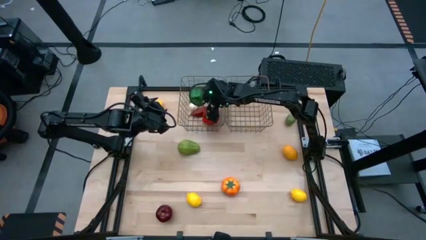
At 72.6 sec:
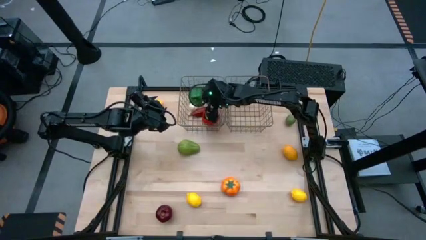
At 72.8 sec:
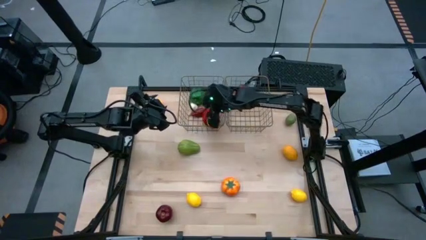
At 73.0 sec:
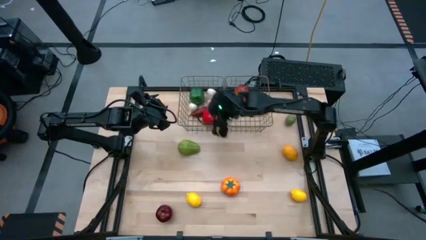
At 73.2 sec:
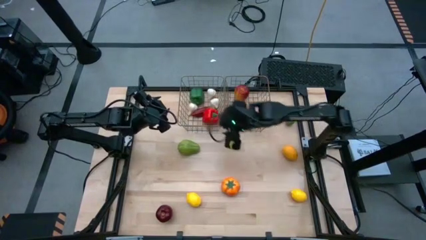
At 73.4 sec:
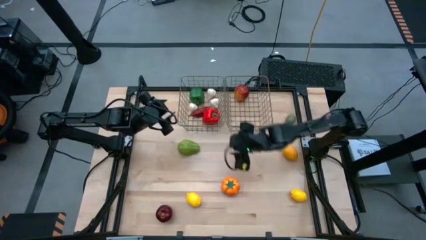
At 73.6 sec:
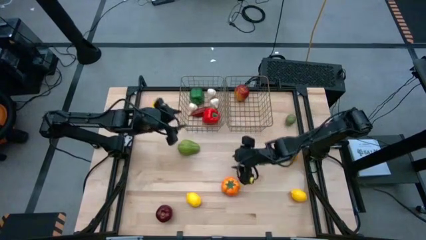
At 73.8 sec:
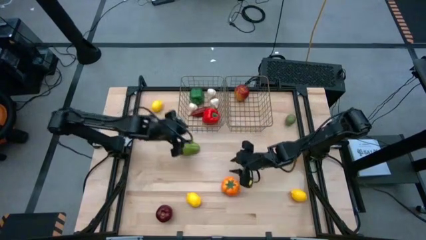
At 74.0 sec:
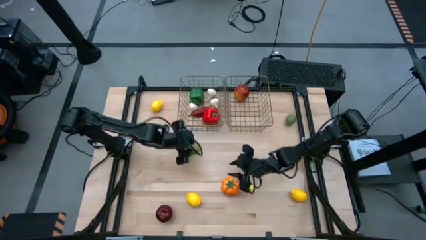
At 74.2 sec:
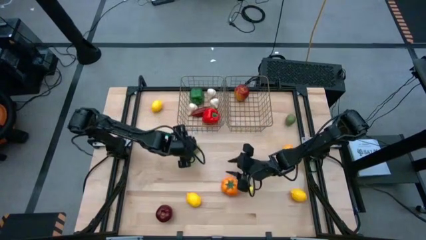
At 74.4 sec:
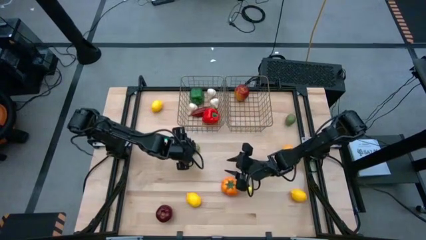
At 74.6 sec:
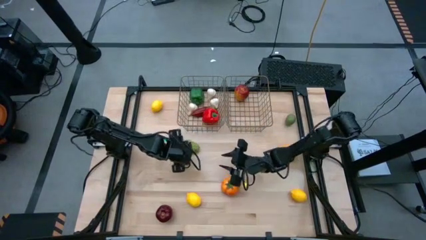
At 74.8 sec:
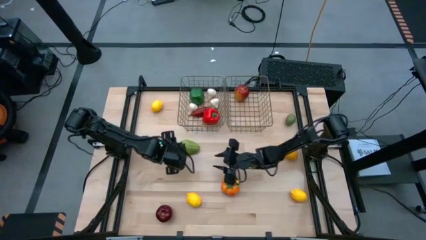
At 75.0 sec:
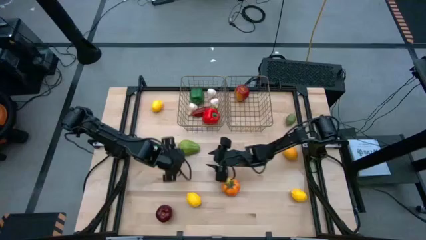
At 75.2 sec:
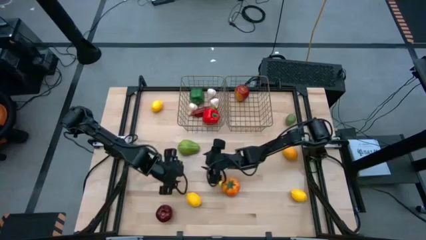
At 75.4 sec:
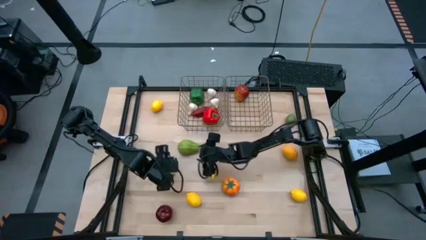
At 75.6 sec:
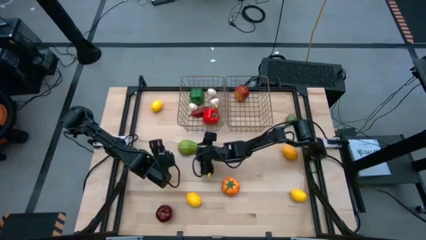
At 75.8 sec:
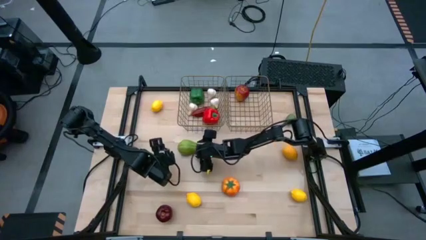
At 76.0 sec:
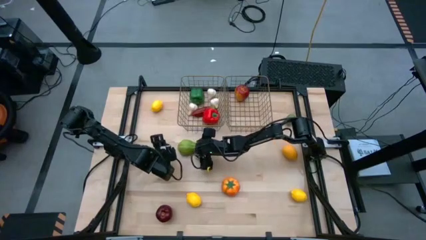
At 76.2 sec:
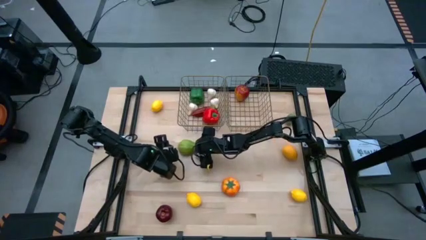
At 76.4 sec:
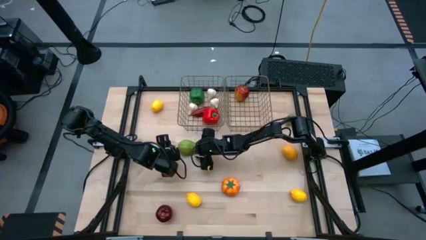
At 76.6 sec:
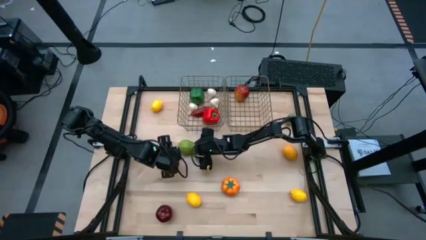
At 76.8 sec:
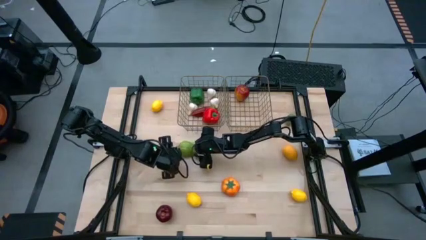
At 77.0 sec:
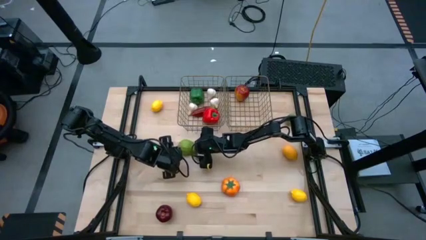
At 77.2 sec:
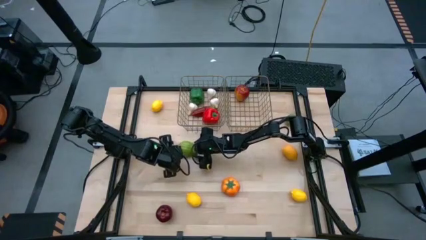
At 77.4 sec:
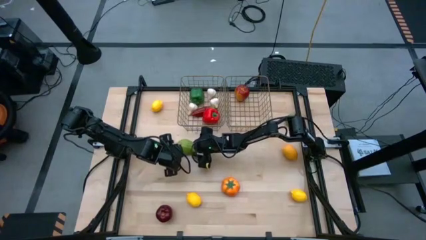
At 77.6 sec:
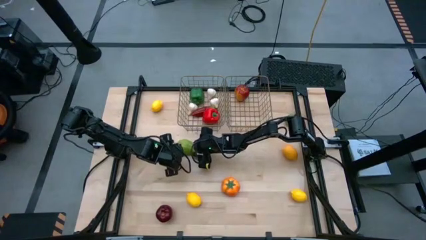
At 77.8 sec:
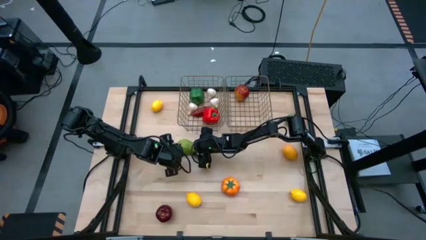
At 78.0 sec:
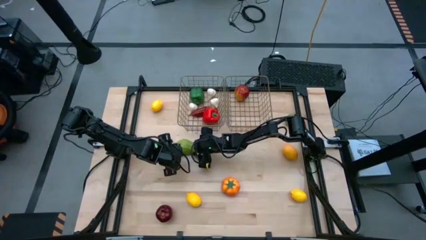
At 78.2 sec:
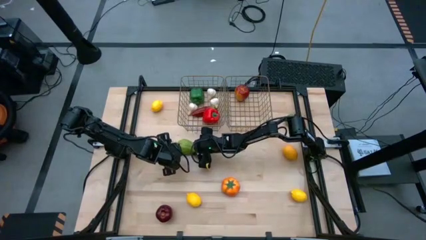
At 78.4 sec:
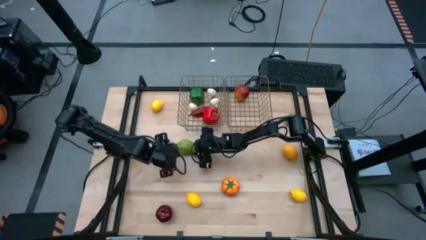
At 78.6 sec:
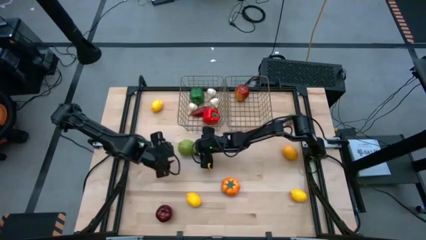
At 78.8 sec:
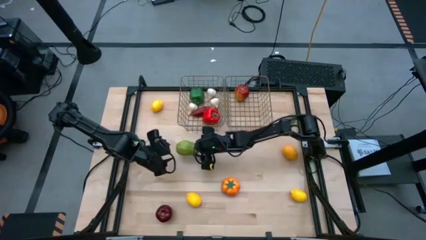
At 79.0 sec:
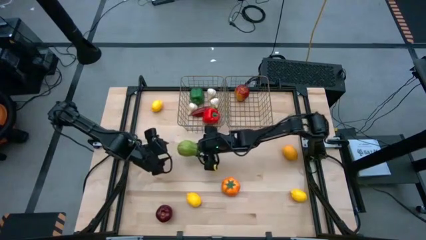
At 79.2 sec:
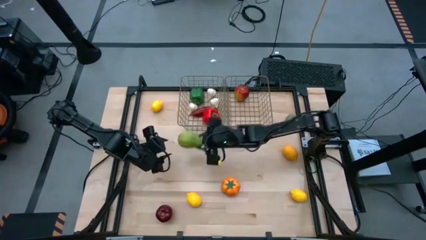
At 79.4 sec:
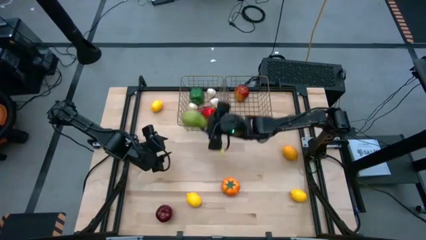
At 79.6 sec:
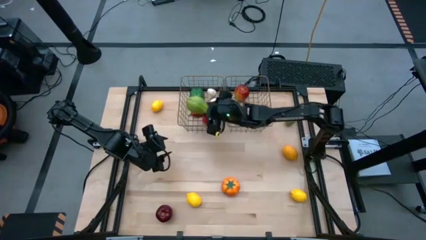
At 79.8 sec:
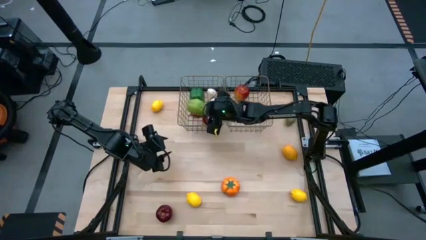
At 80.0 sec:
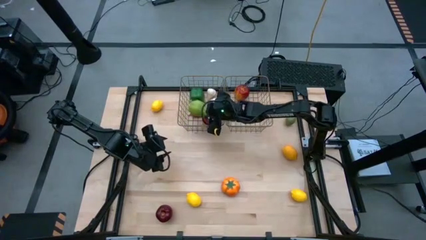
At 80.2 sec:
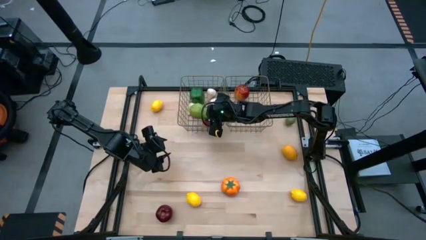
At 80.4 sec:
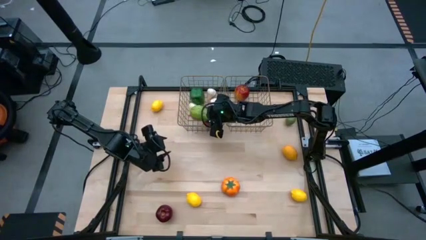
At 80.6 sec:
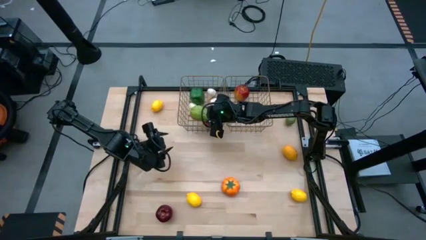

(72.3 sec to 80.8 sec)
Task: Sort produce into baskets
Put the chayote into the left mesh basket

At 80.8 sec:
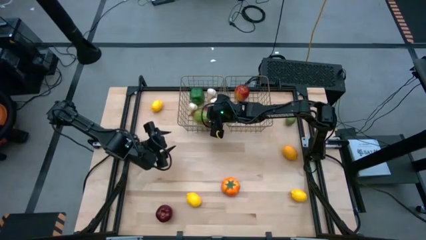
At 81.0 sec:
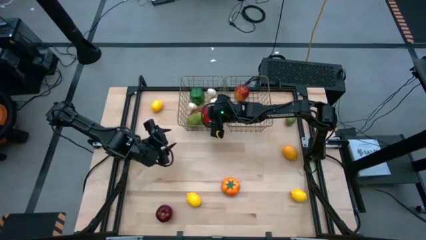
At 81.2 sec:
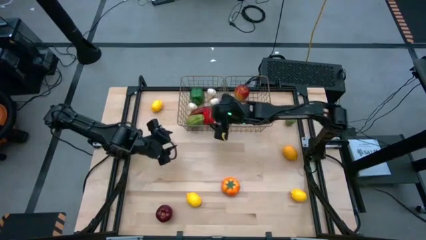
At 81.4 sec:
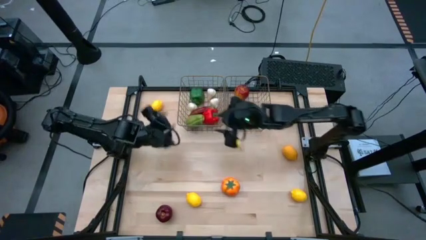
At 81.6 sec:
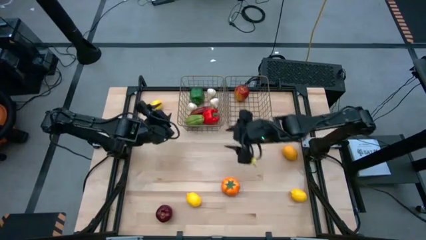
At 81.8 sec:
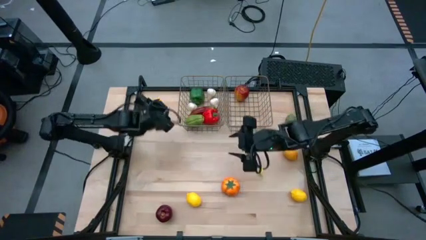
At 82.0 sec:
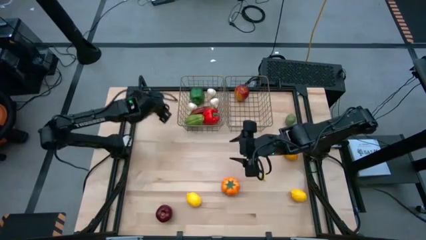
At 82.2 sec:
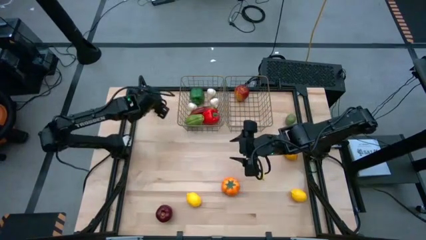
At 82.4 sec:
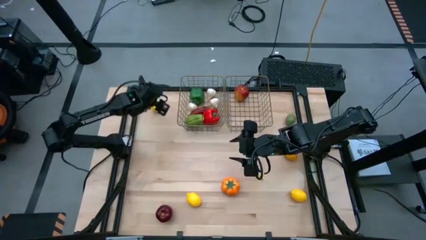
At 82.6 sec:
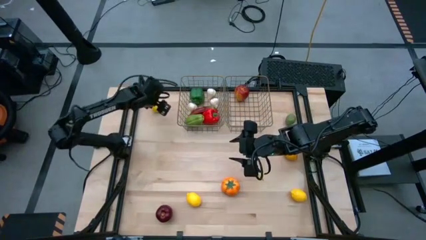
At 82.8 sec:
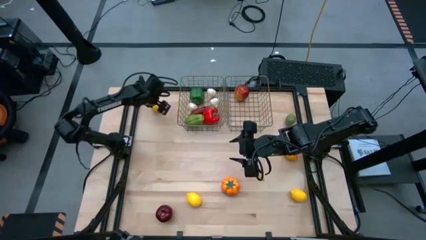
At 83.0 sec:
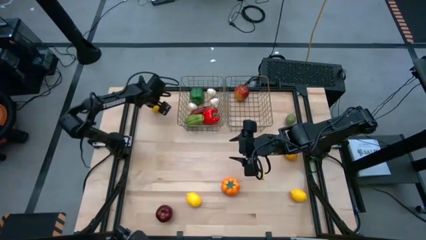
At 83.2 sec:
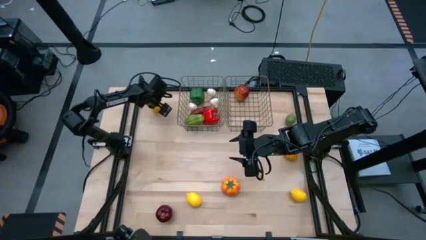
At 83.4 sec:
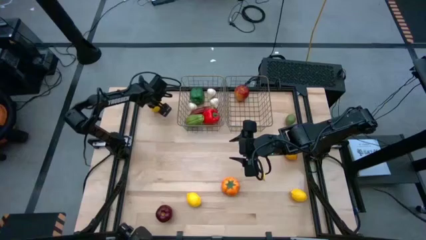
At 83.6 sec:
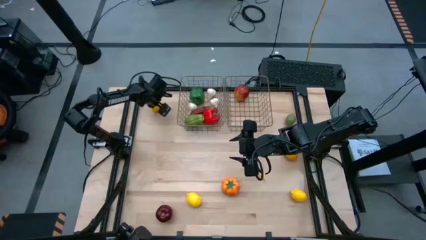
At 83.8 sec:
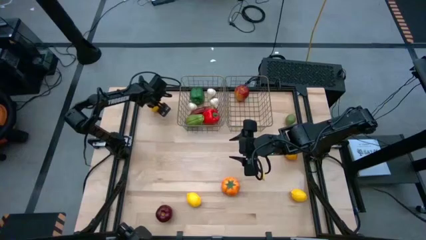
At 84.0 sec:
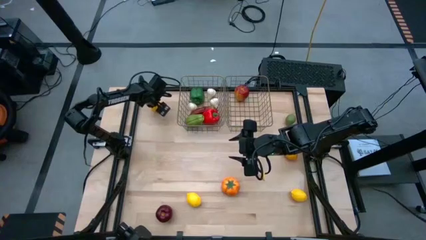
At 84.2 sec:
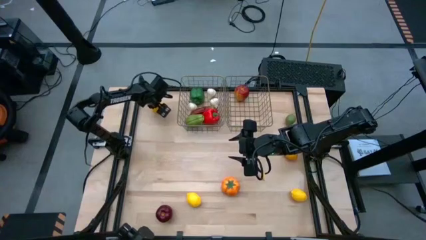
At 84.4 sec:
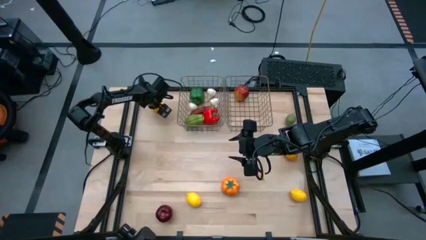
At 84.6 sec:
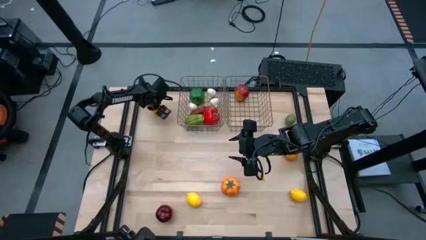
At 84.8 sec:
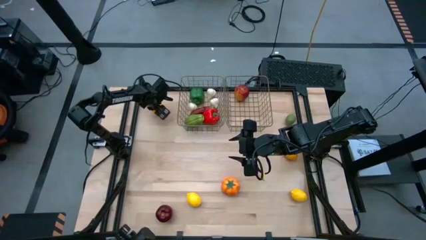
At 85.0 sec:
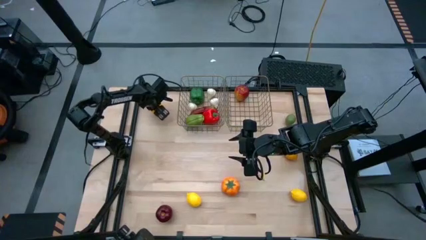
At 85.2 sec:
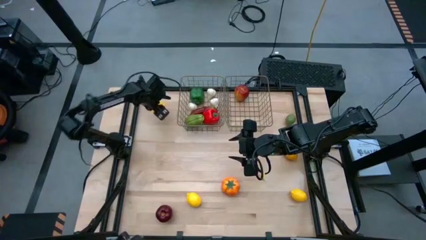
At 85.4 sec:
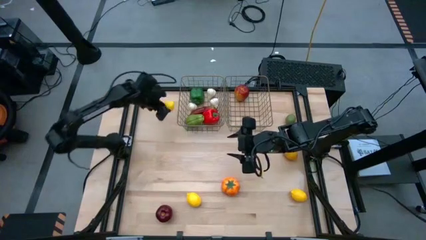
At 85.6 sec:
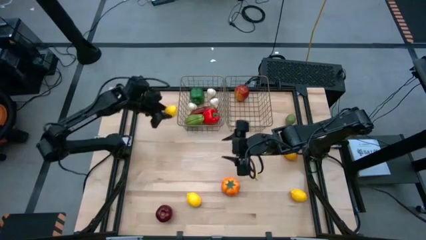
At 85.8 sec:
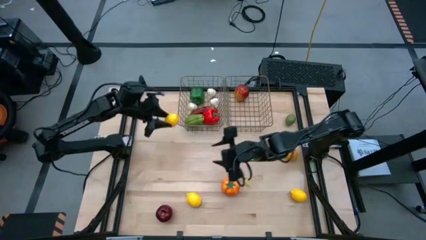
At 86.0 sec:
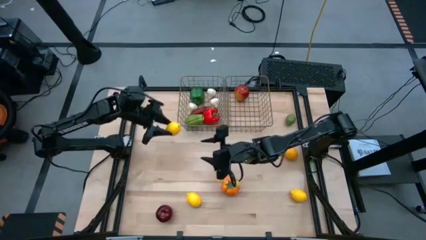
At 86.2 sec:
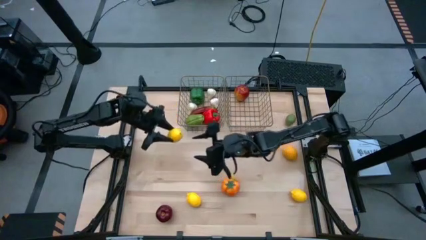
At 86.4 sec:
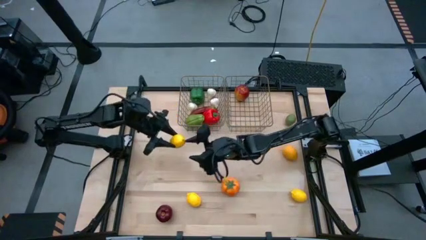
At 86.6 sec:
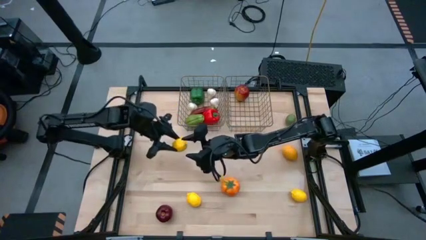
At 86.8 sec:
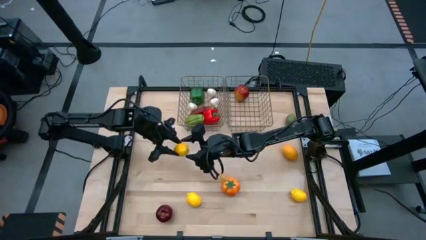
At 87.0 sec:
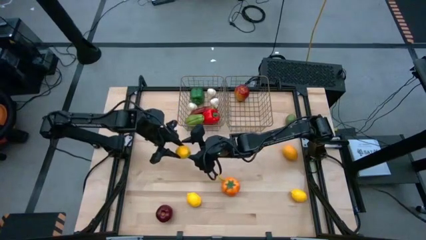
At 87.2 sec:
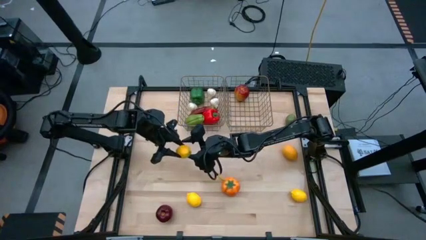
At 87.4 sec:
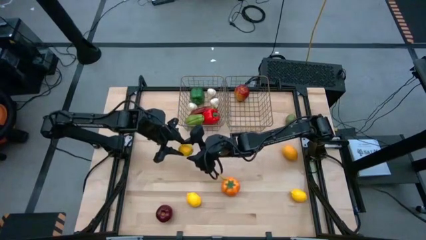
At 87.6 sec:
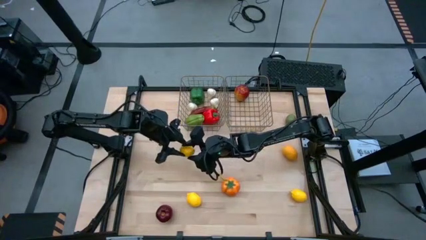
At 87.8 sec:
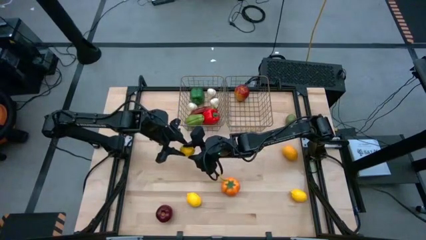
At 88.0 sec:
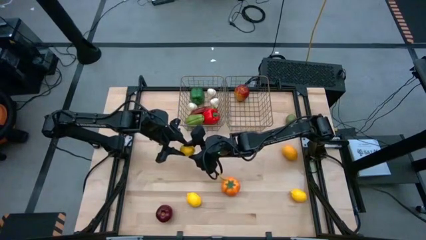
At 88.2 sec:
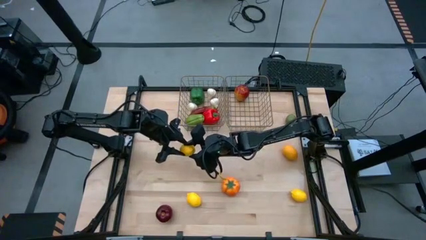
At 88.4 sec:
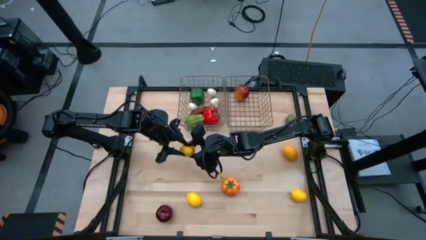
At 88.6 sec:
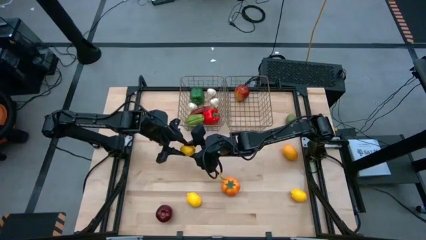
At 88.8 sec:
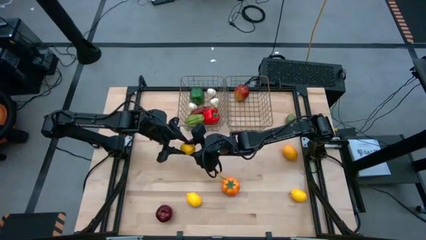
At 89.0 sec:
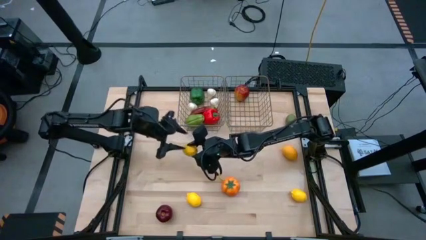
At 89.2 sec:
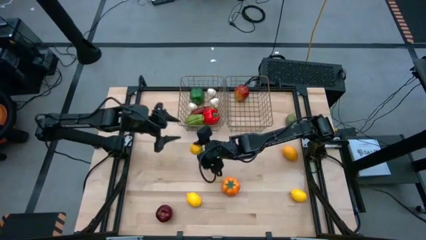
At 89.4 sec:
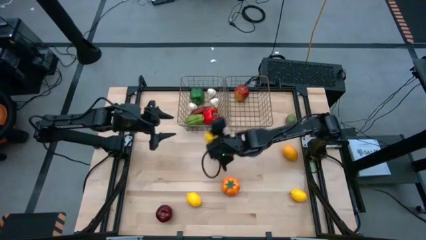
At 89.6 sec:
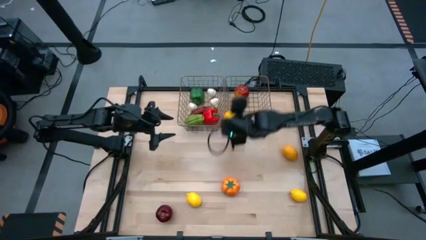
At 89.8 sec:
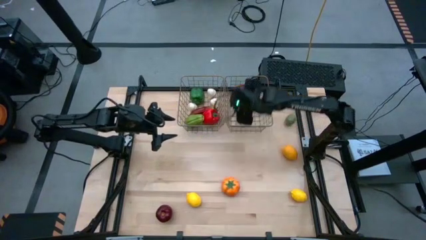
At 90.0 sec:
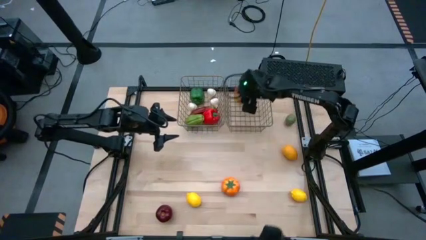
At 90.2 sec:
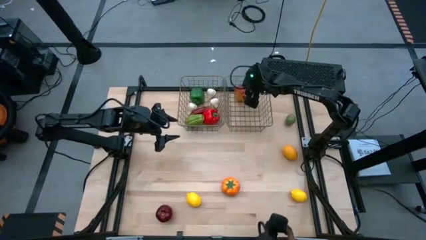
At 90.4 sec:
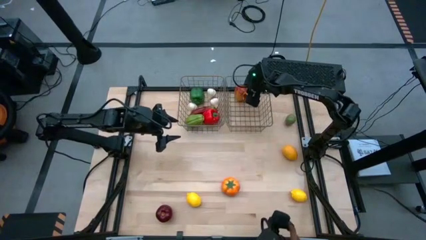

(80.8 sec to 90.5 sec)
Put the top yellow lemon into the right mesh basket
